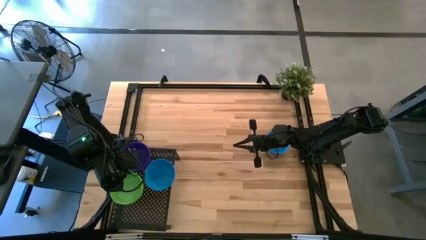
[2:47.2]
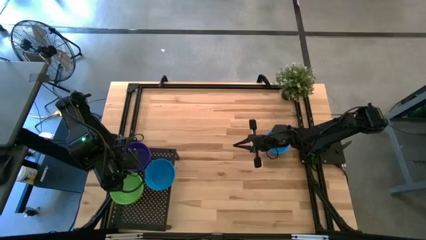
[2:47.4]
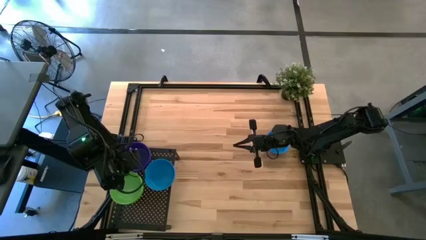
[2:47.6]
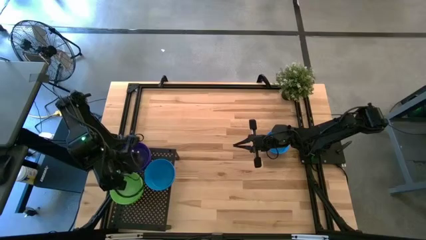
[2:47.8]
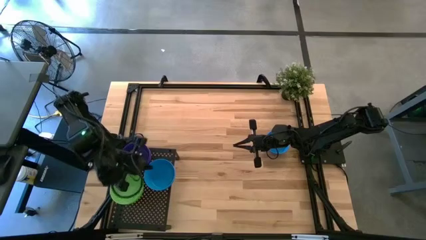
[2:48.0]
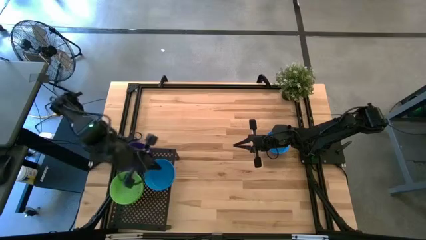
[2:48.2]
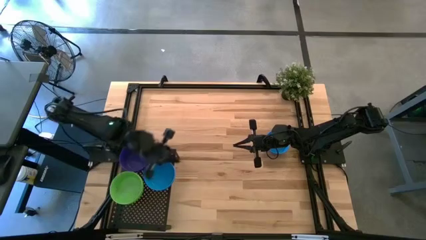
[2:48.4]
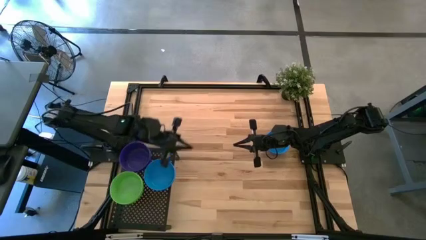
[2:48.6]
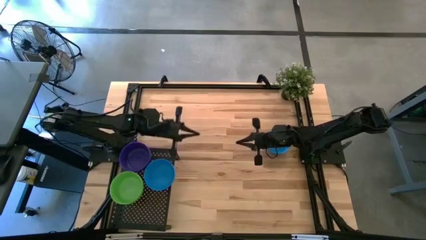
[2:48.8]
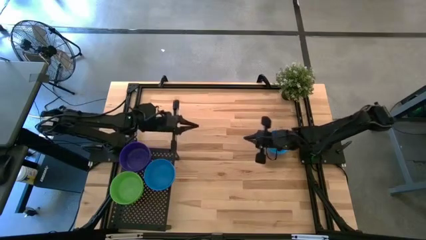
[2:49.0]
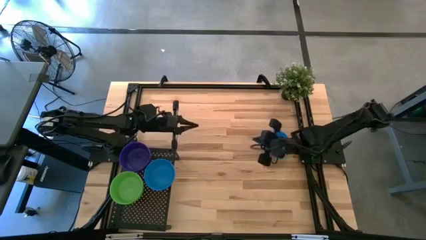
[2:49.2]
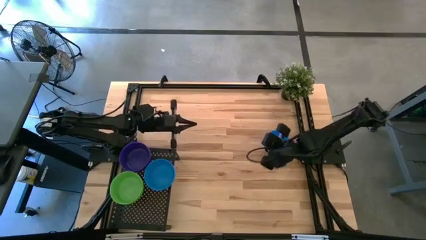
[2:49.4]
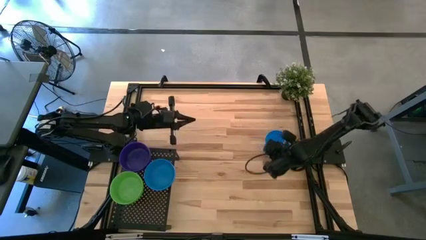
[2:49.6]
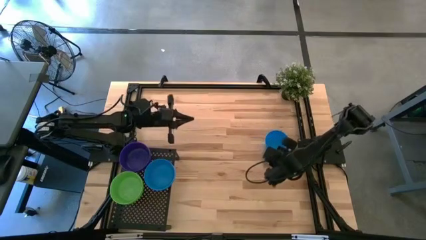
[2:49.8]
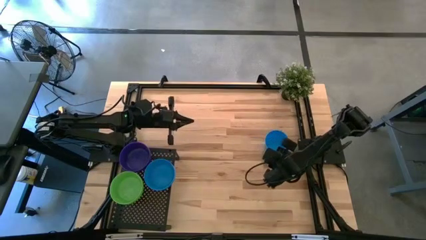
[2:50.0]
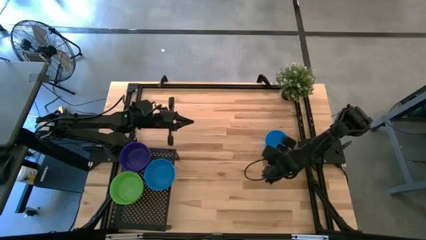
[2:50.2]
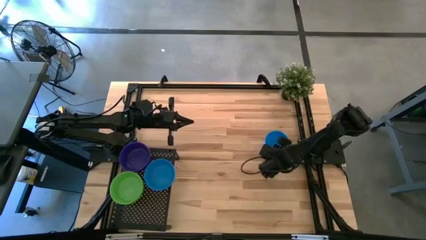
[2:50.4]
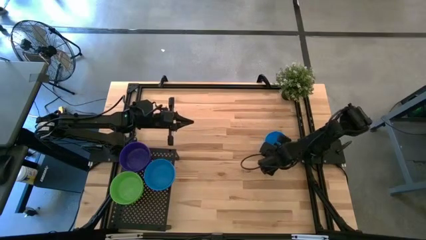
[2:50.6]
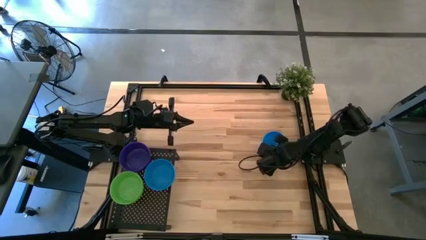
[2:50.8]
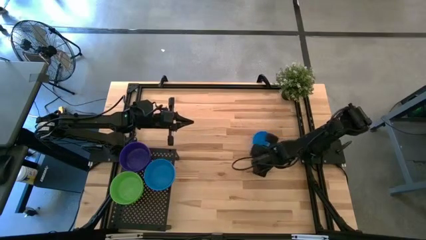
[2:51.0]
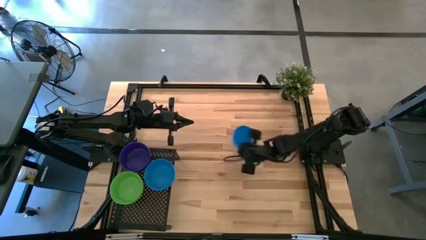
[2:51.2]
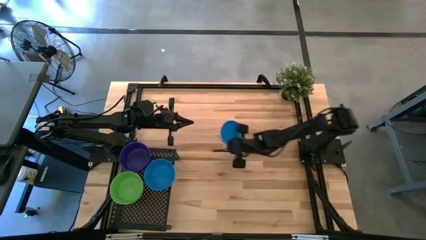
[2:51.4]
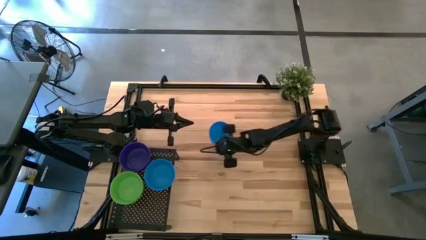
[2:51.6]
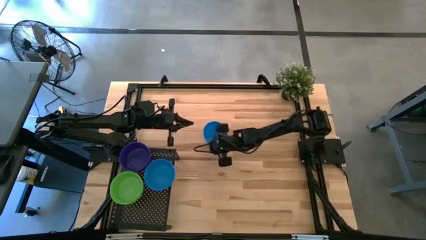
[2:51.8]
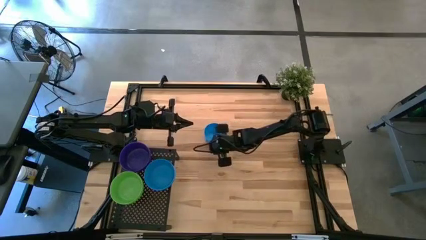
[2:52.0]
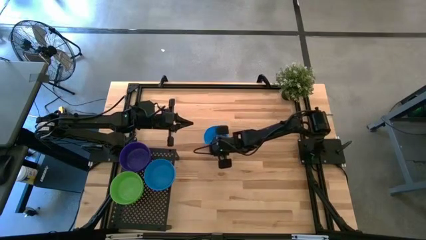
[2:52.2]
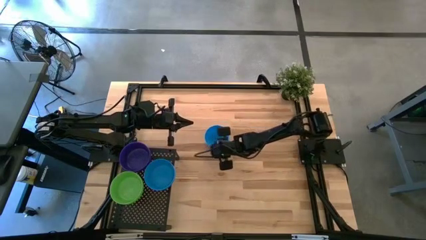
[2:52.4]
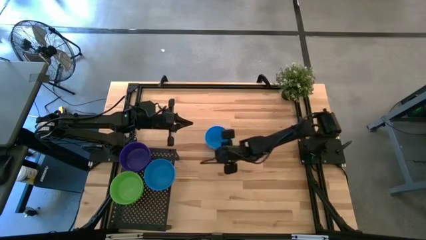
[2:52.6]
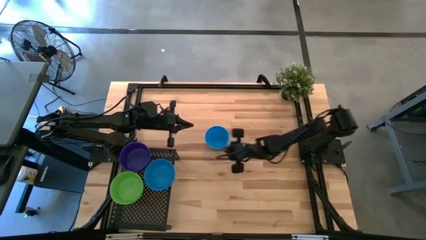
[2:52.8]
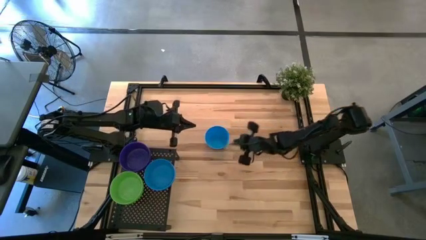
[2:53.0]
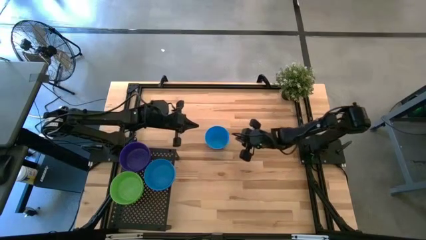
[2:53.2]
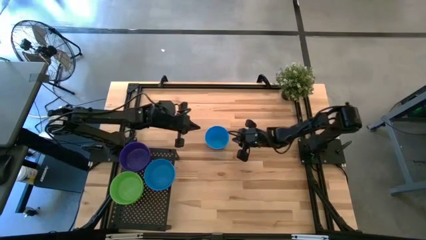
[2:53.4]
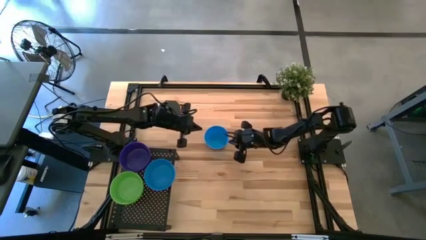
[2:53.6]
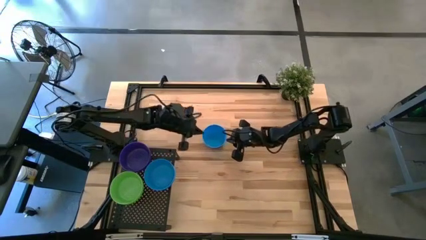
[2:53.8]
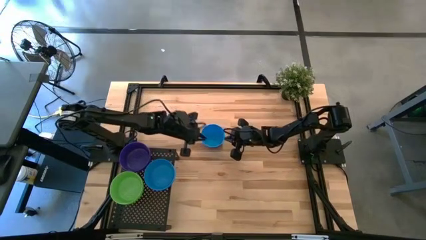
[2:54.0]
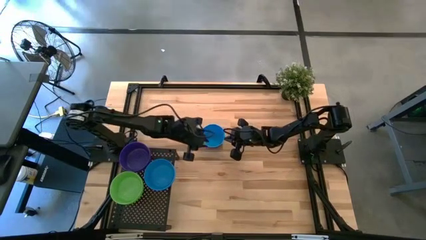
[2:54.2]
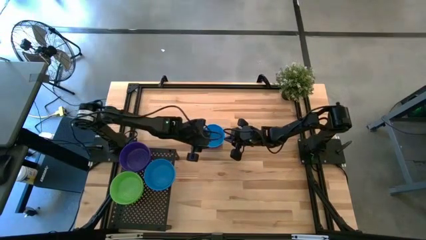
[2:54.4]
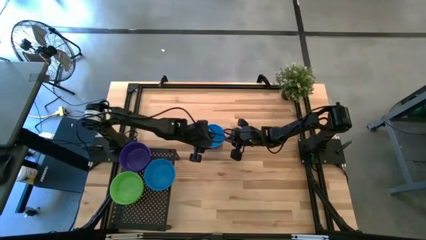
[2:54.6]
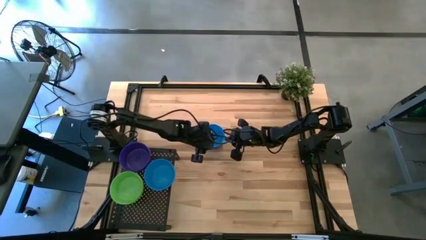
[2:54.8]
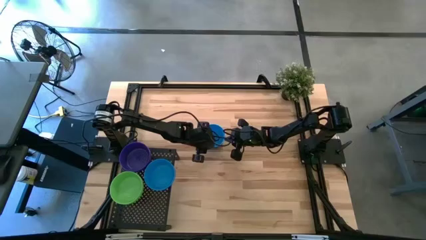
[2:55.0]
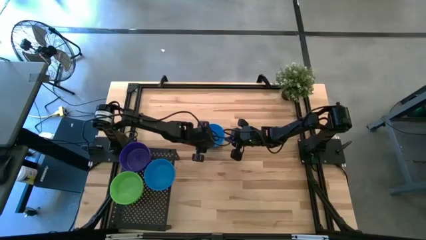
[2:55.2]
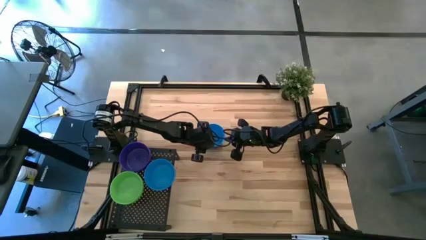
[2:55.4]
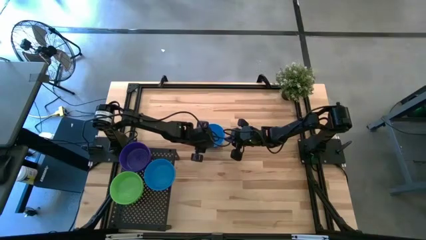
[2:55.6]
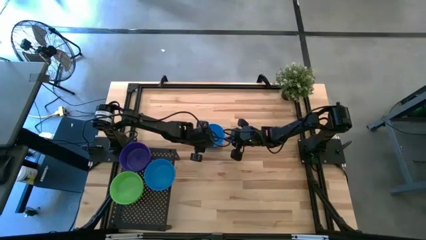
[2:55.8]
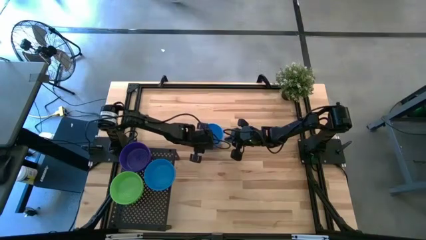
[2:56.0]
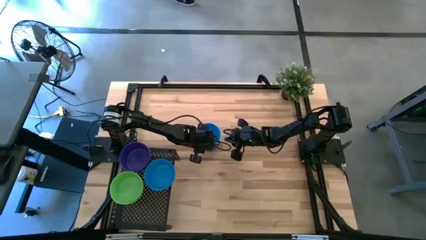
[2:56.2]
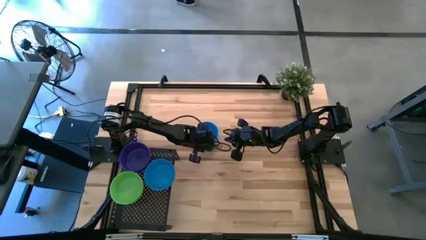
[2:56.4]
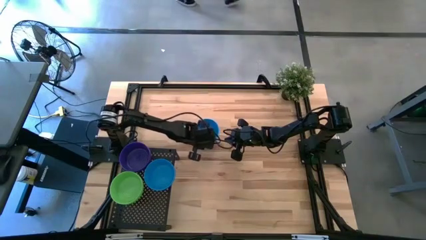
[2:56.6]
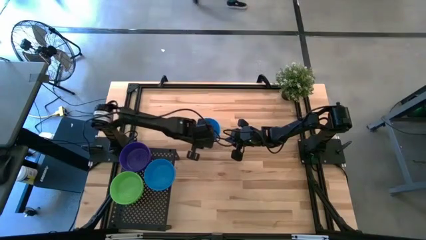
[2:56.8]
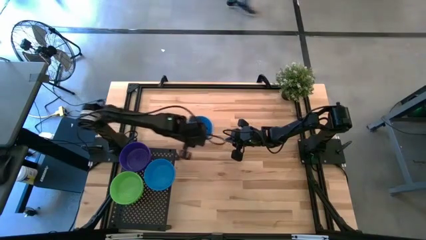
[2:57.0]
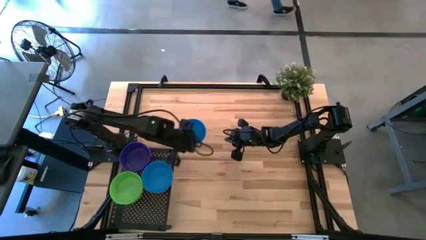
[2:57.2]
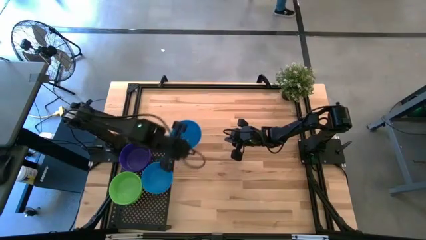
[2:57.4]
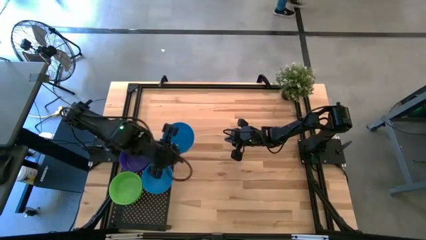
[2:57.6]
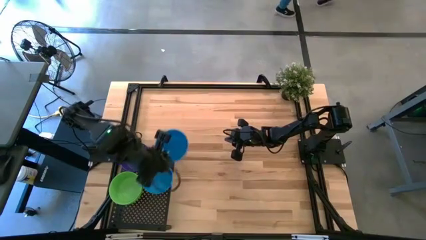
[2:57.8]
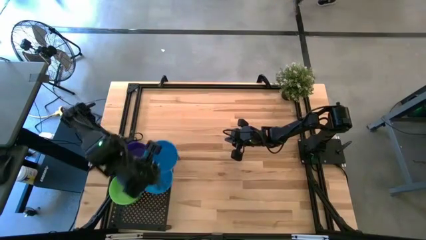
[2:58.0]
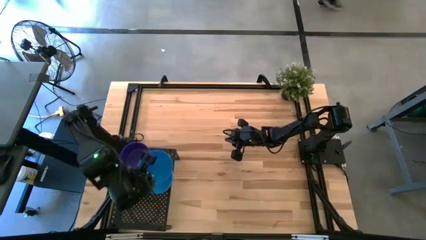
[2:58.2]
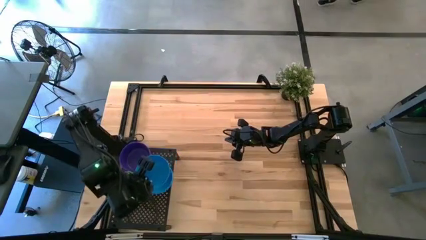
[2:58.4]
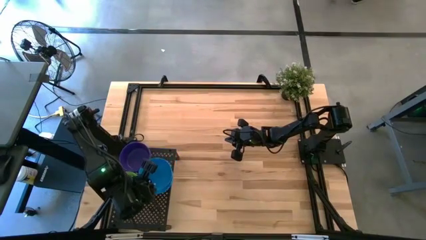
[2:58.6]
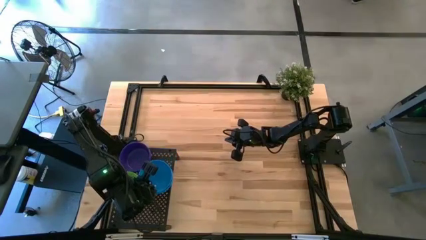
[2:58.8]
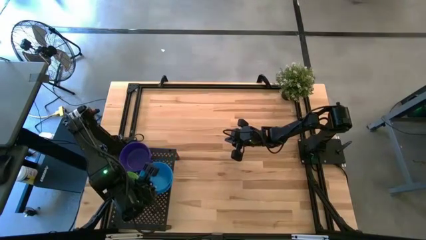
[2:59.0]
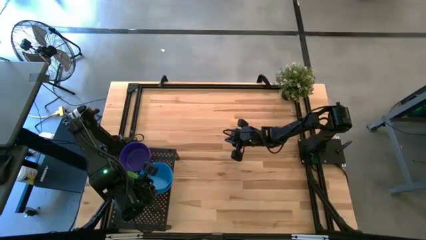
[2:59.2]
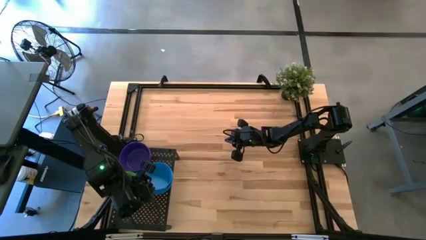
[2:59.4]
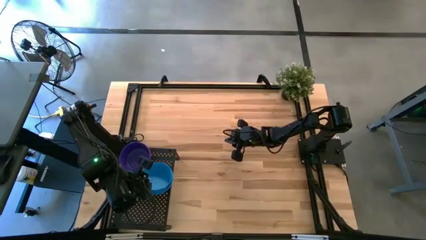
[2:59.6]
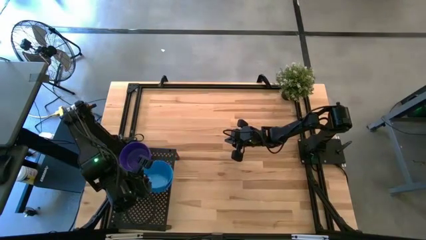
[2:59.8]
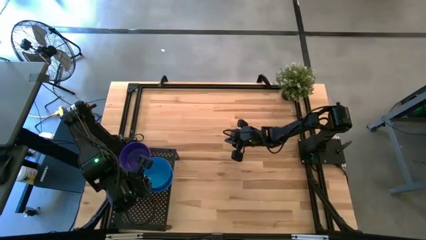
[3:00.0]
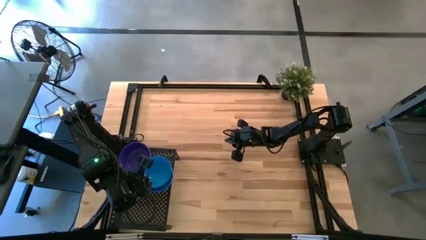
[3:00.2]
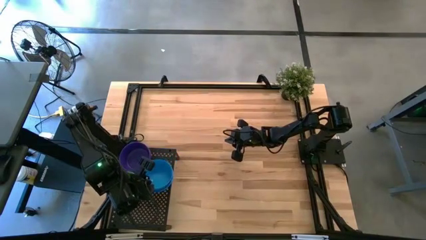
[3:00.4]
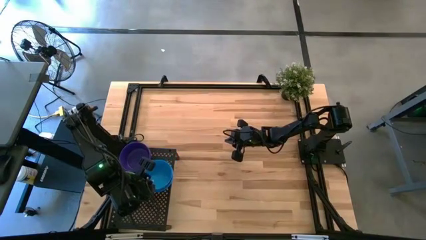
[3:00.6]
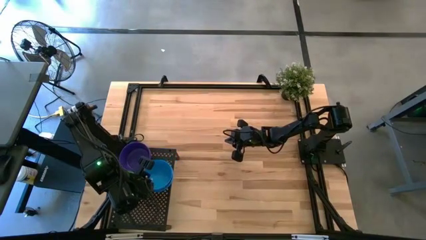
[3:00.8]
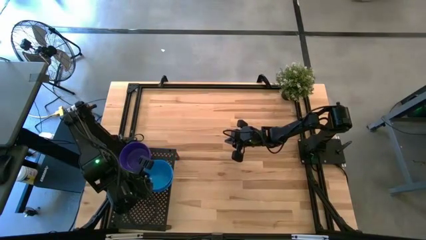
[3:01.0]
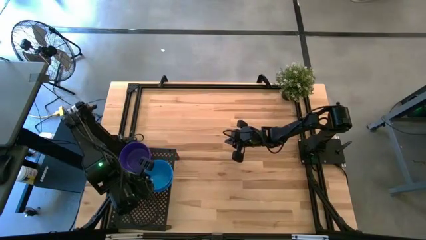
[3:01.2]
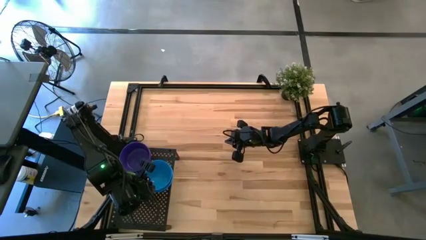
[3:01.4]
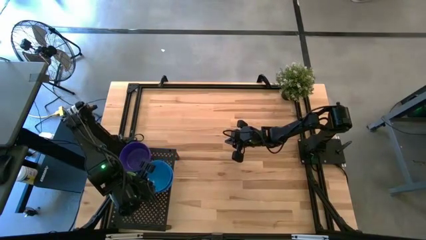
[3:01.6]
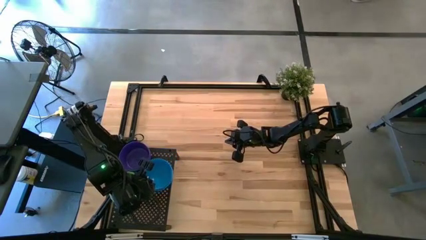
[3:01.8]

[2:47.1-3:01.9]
Task: Pick & Place Mini bowls
Stack the blue bowl on the other blue bowls on the shelf

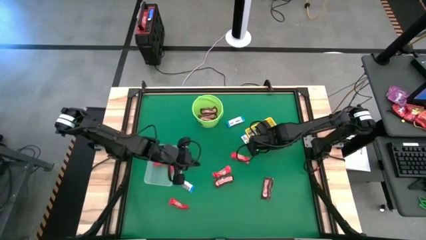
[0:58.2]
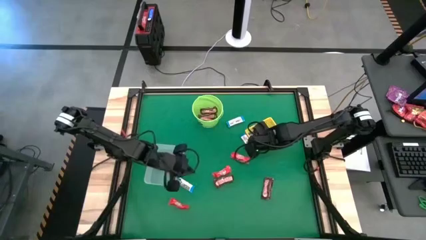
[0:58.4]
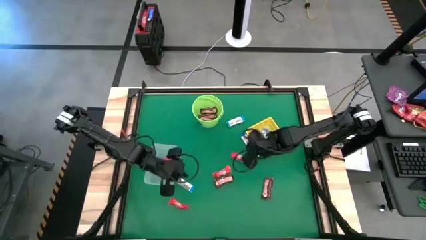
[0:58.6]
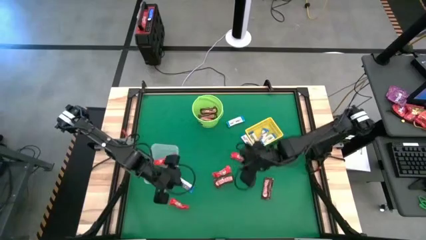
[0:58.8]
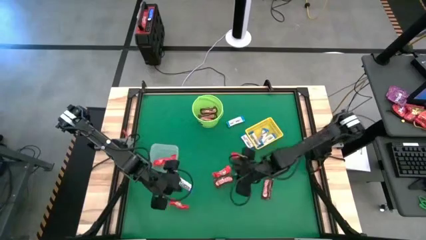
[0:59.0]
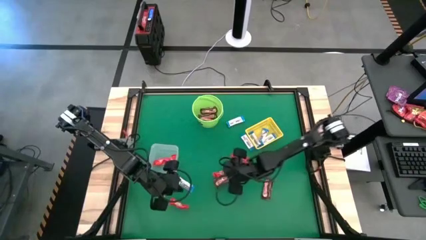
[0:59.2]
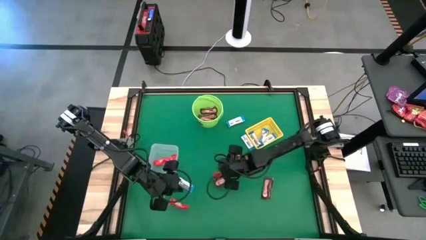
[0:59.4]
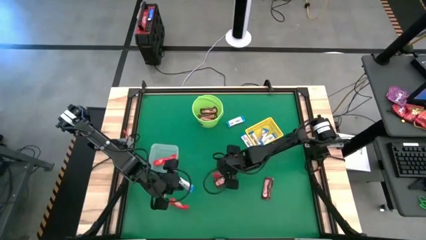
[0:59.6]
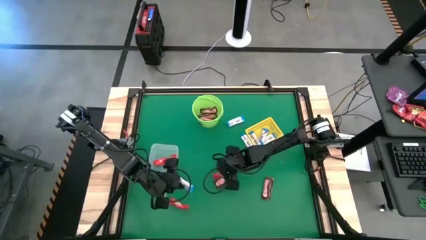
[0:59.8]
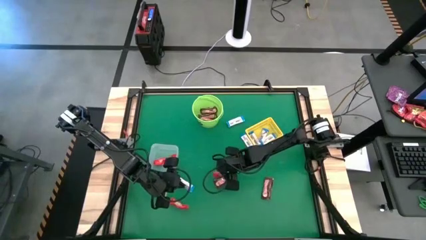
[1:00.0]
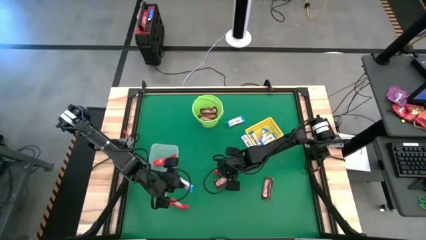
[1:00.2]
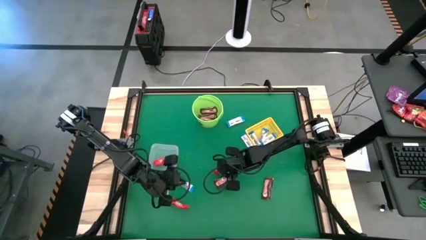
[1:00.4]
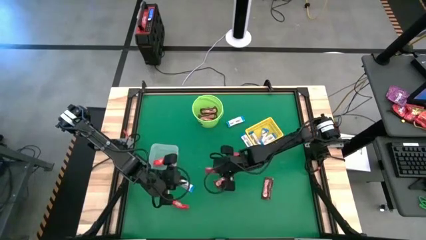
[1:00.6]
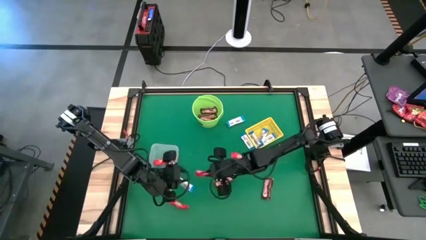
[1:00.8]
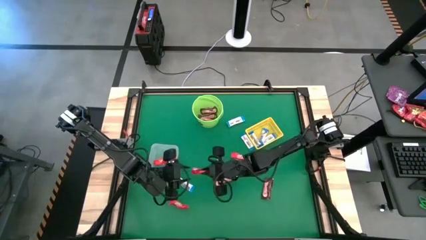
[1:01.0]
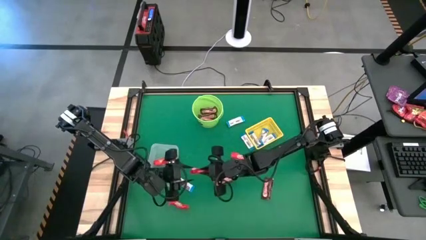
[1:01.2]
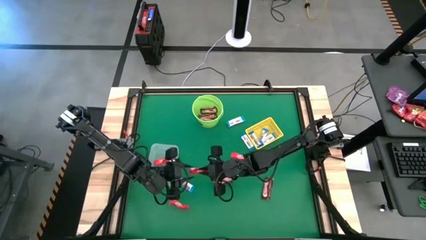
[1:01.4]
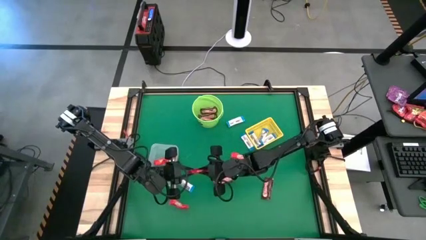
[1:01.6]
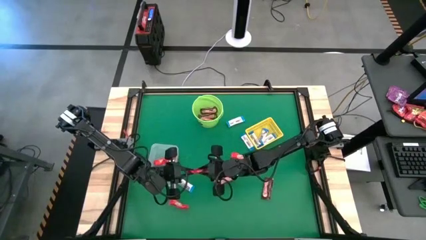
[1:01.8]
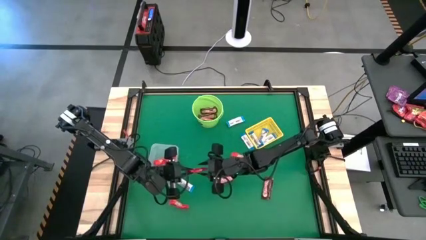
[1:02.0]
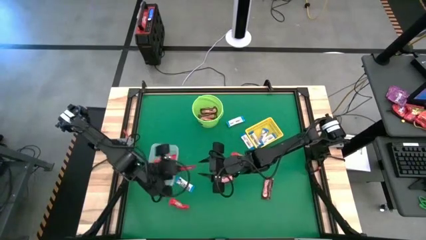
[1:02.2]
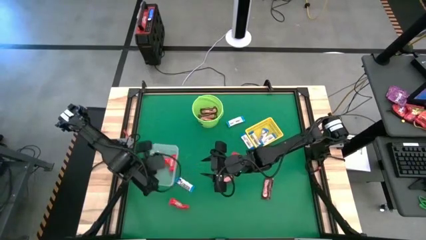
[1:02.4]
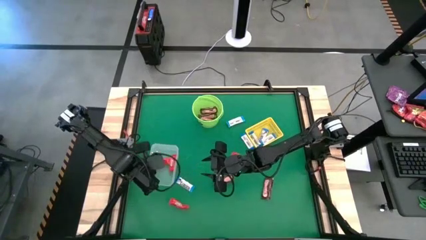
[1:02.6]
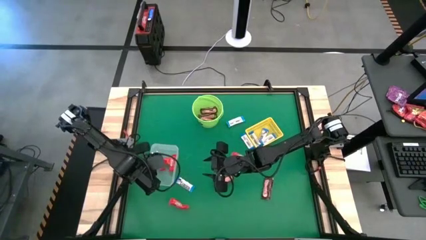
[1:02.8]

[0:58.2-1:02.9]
Task: Sort candy by brand, put in halloween buckets
Put the red chocolate bar into the transparent bin
